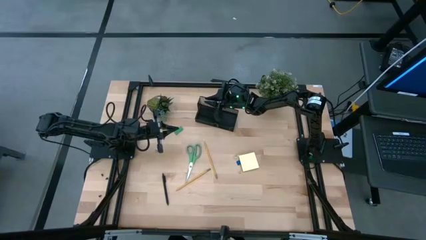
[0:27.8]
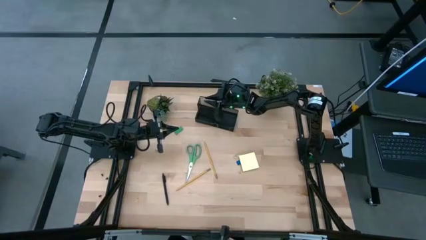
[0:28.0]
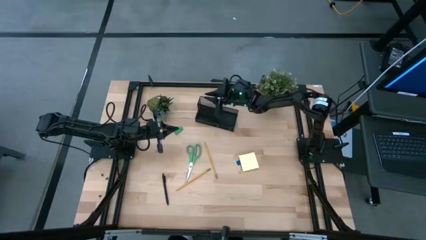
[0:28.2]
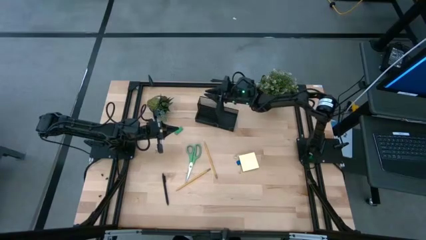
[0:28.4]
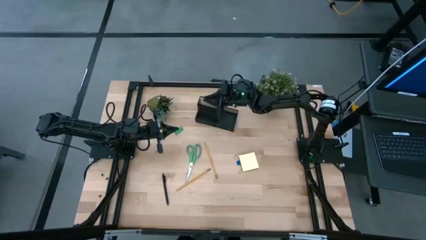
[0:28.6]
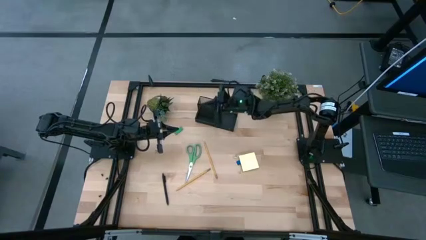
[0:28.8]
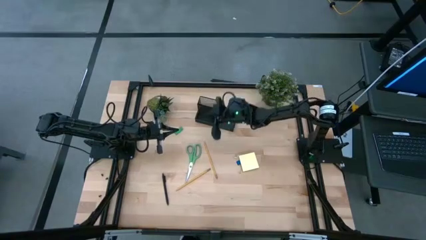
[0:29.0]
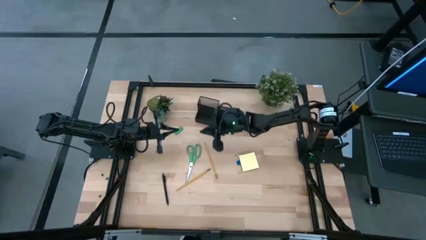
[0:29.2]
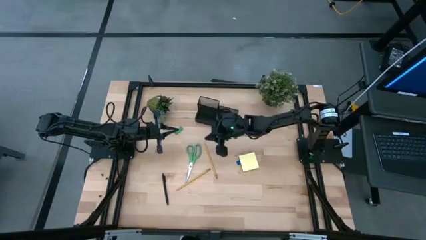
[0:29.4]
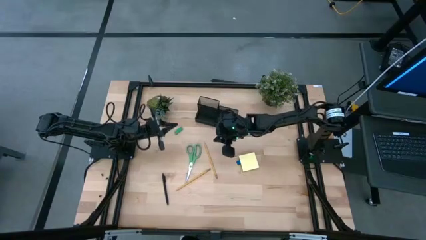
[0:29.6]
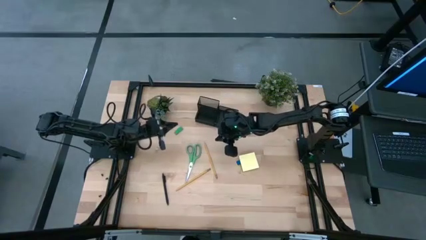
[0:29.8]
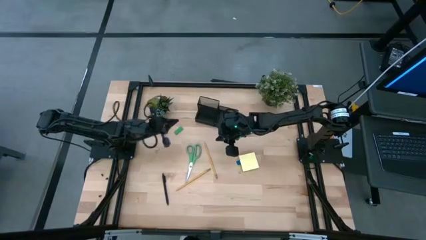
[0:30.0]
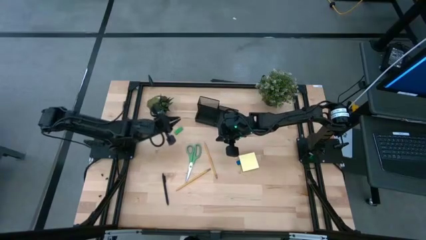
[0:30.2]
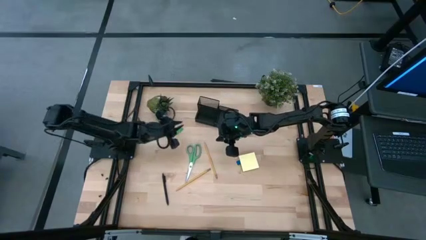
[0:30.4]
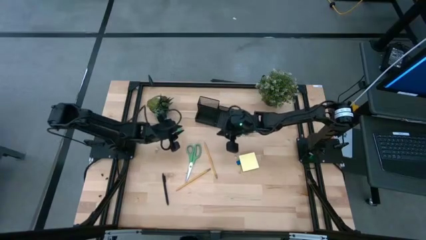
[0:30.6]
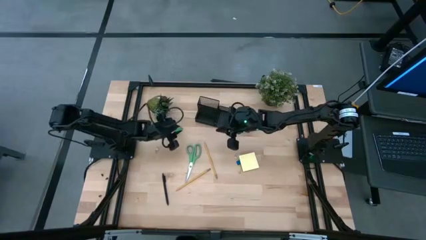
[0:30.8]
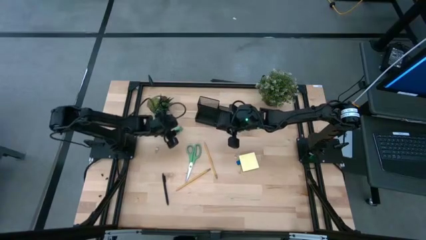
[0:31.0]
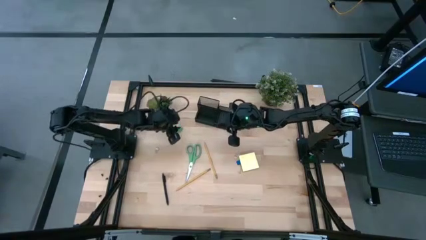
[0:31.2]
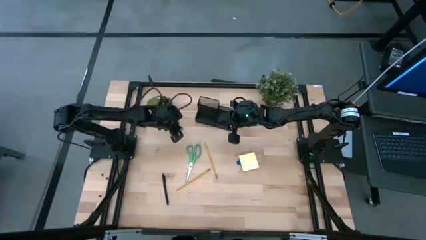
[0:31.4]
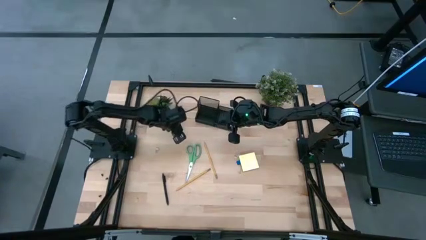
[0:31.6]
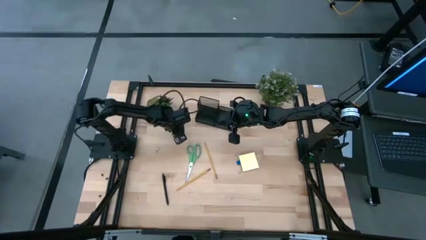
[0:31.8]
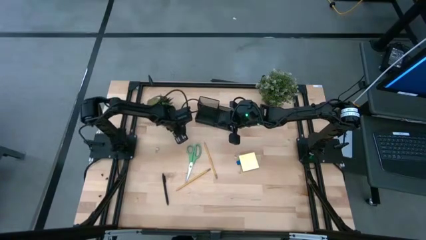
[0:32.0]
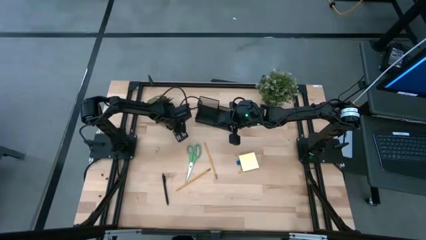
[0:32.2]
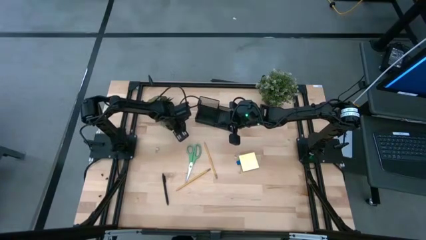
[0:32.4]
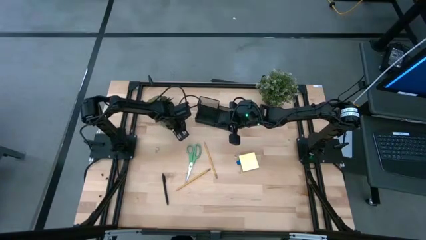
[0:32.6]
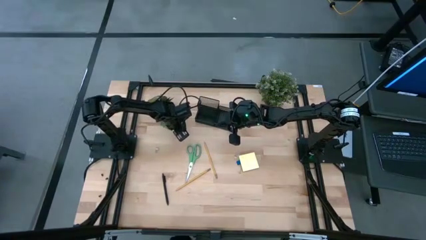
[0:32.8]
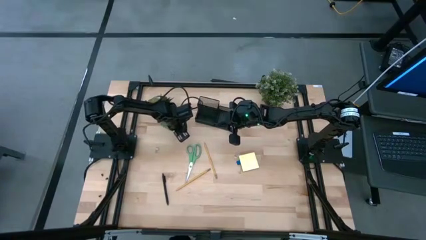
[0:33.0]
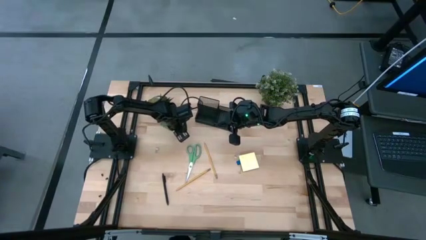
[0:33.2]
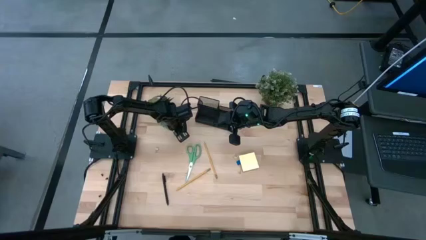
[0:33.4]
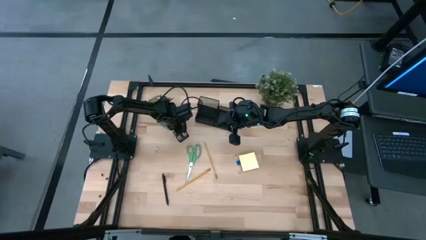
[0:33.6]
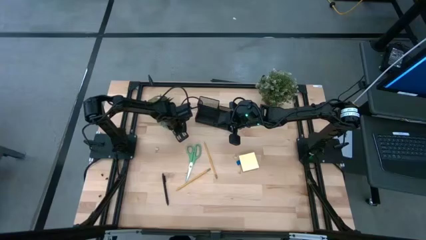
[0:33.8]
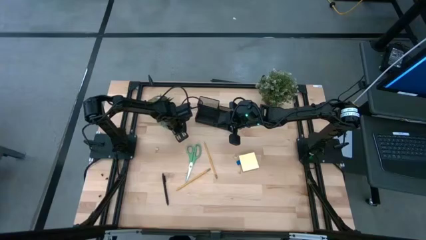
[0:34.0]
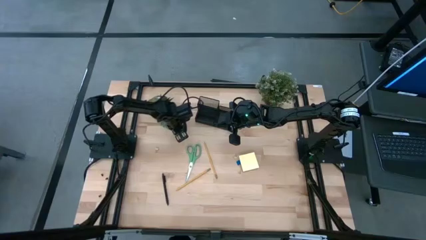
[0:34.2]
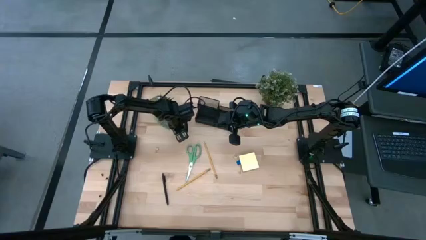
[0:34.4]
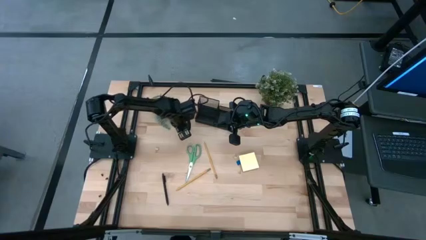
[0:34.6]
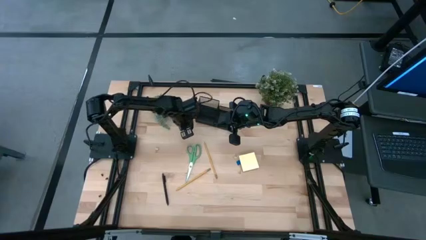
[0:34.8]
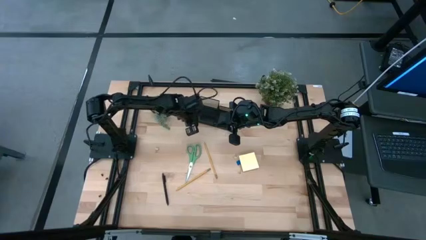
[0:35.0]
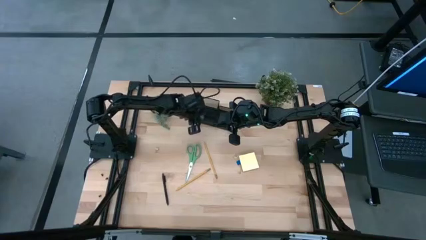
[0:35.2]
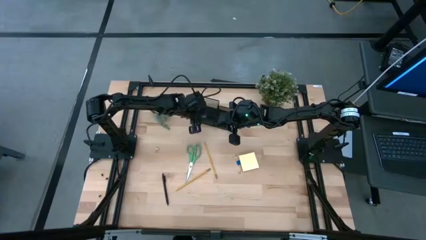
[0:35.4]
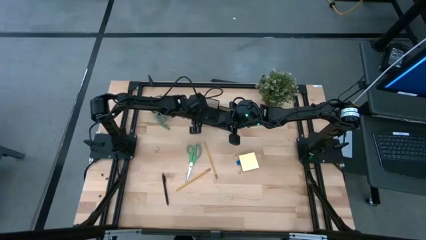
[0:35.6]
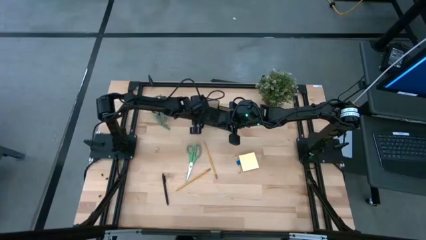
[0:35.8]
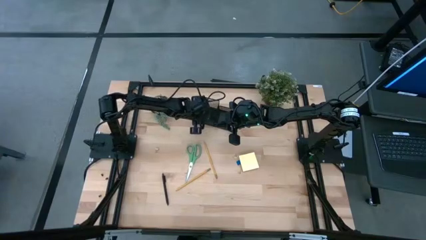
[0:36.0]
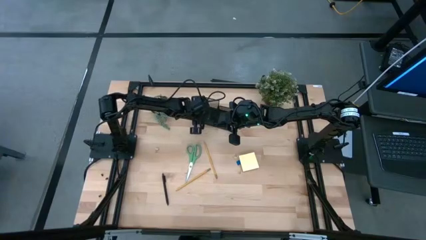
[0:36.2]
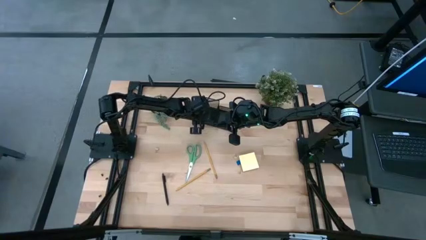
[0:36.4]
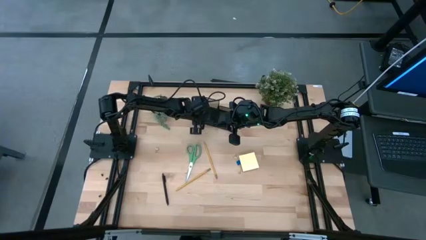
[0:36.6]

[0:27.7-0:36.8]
Task: Pick and place office supplies into organizer
Put the green eraser into the desk organizer

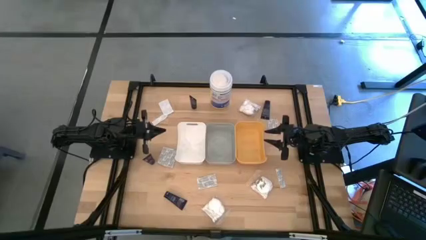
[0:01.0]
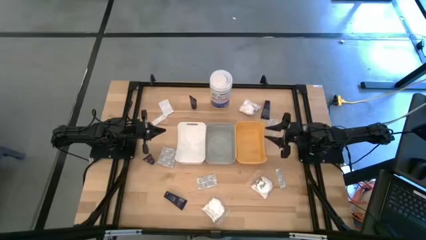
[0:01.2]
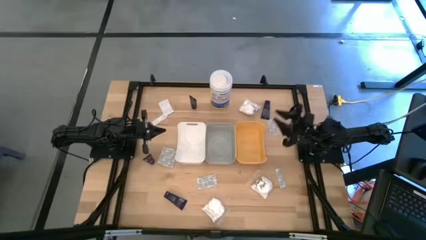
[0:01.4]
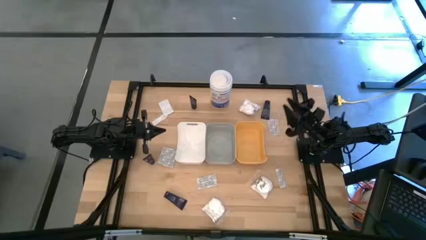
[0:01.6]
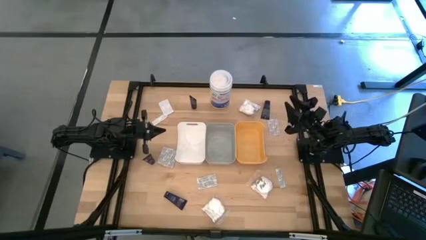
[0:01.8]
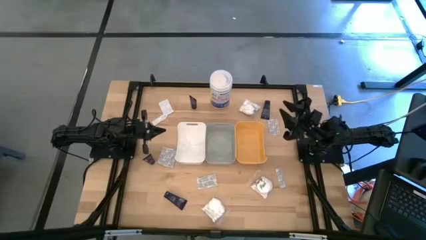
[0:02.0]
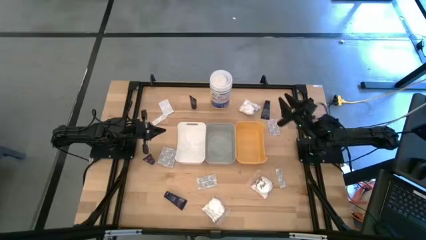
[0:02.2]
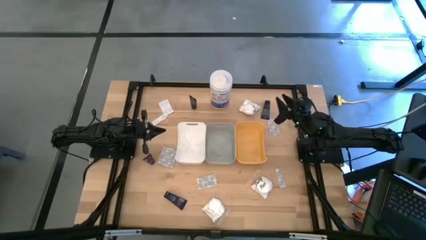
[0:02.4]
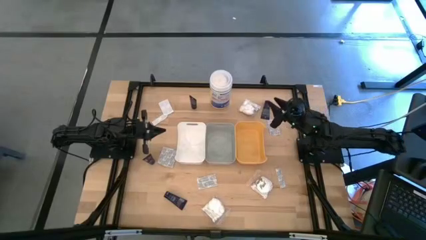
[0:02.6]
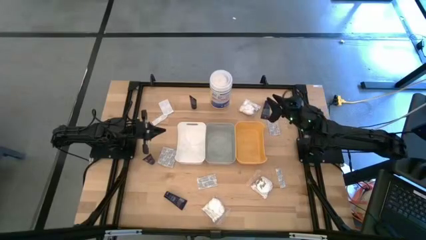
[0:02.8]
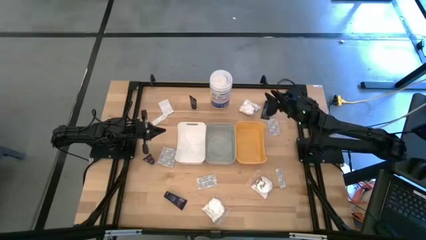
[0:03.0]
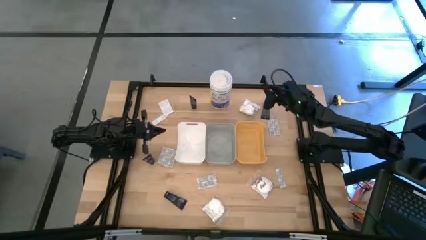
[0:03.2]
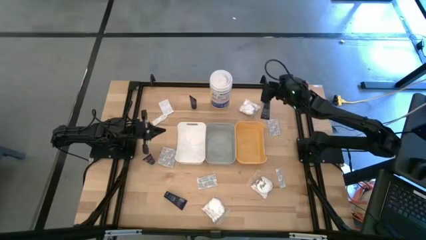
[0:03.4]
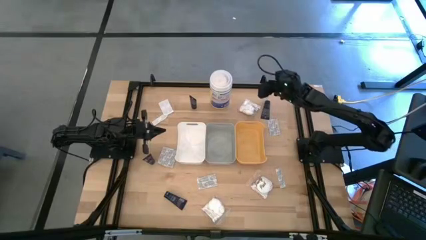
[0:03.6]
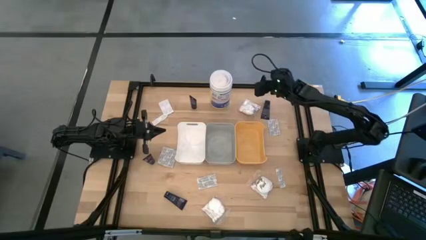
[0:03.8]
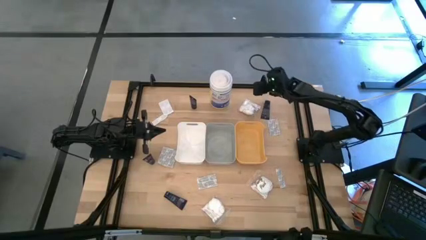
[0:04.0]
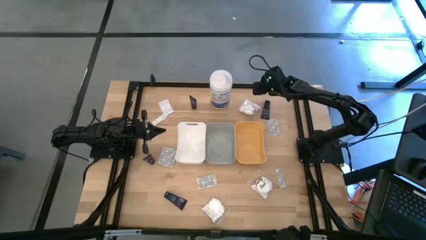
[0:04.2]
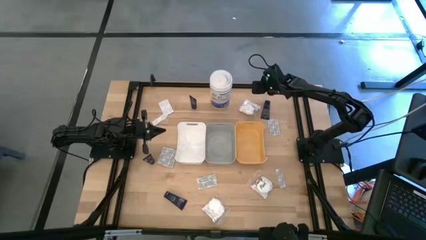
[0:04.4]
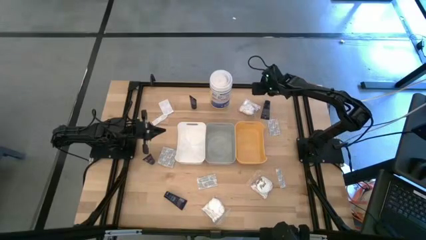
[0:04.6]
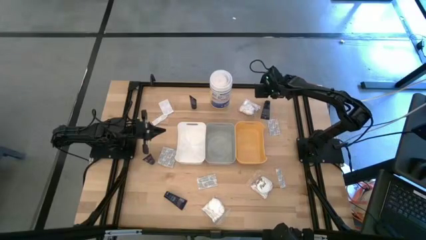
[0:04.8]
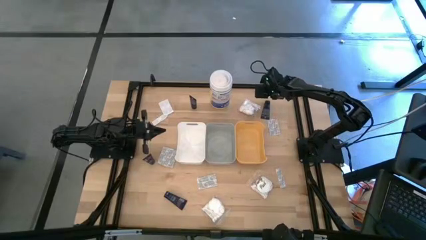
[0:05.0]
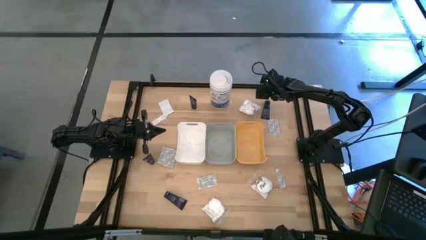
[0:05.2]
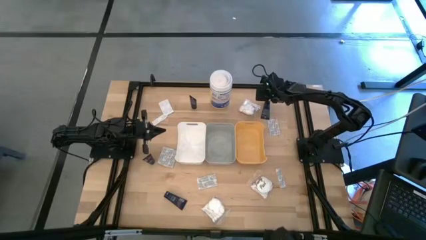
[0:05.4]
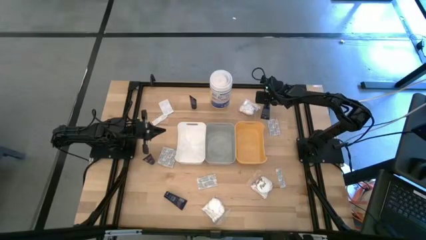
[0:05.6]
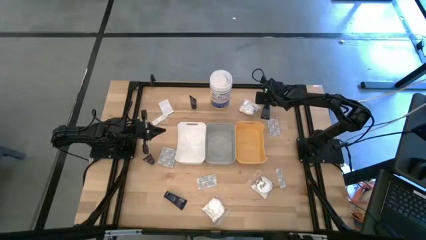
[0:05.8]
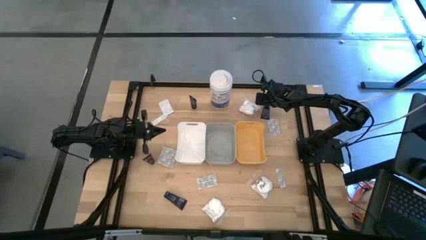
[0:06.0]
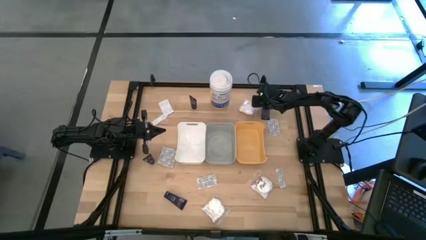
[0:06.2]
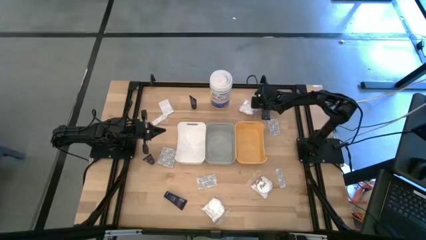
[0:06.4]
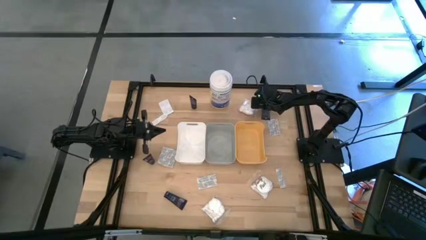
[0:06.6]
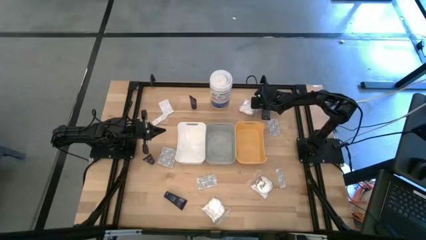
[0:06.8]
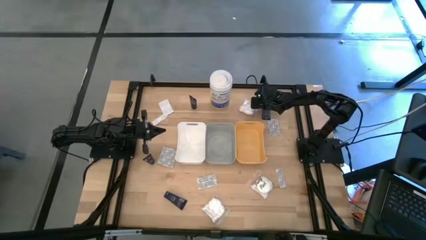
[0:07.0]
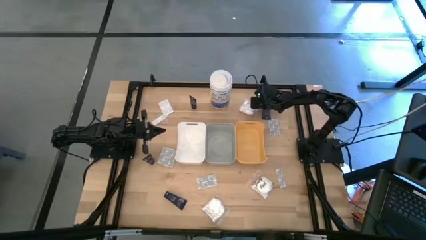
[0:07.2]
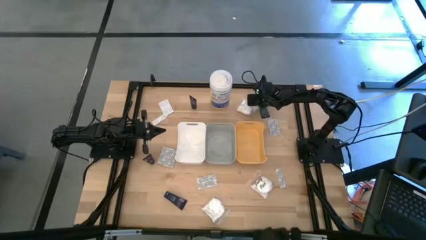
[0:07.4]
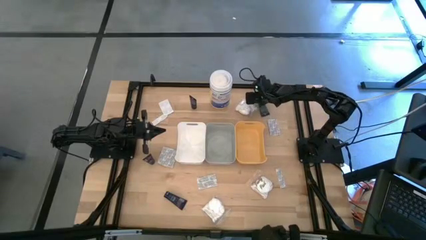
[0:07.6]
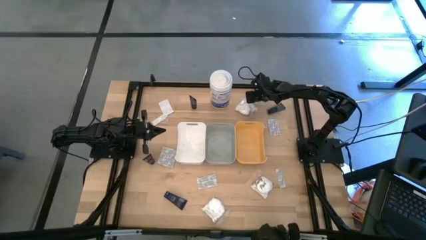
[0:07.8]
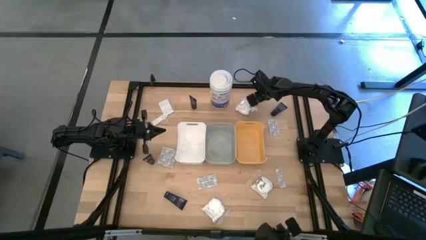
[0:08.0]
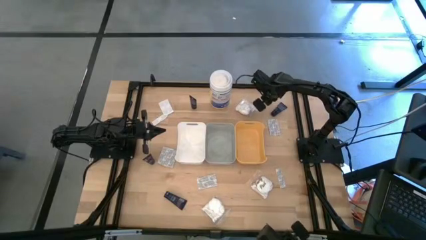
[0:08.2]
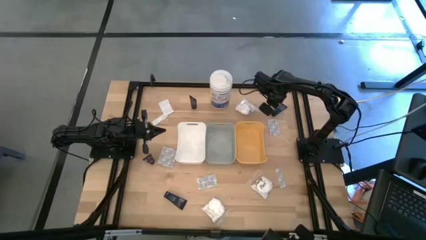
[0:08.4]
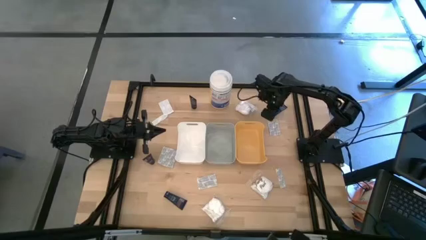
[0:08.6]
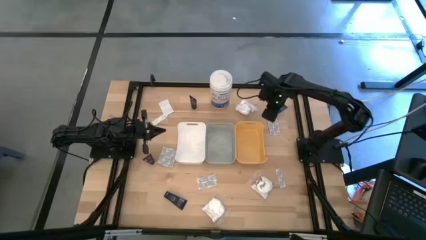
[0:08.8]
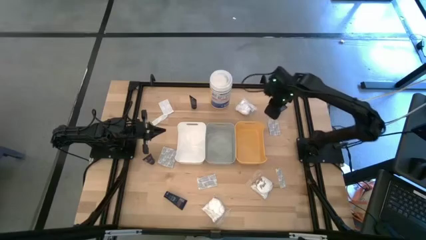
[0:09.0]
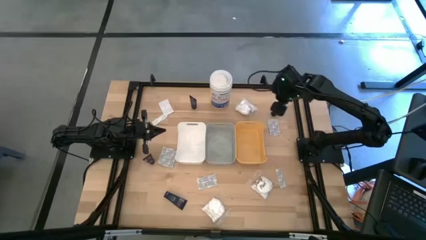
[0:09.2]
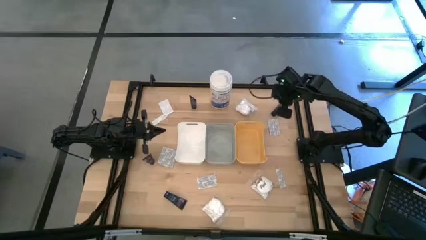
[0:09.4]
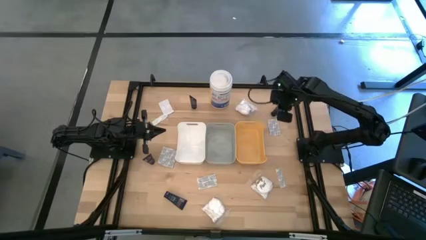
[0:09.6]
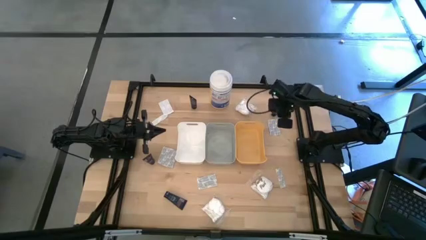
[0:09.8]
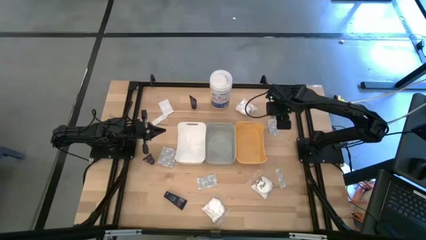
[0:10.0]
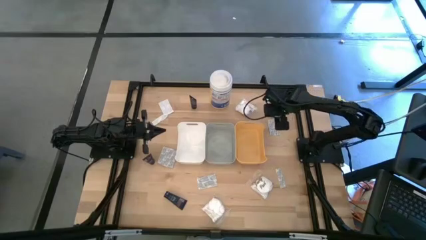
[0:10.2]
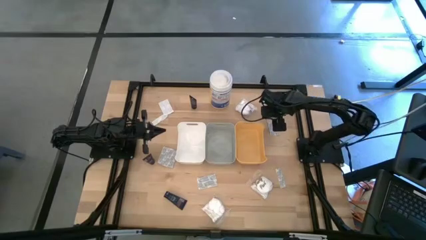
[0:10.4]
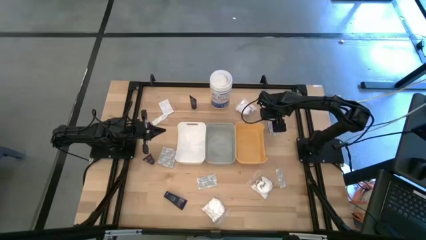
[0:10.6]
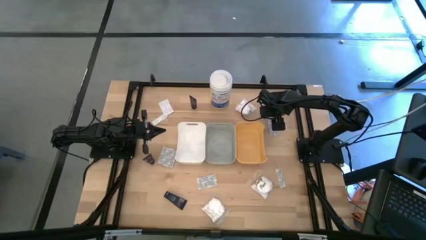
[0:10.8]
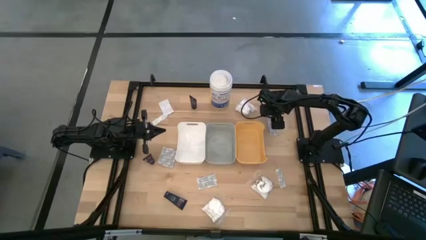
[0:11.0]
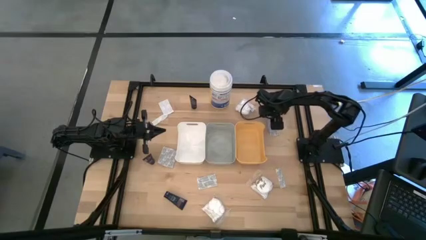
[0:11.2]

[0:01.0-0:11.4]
Task: Pick & Place Travel size toiletries
Put the black shave cream into the yellow bin
